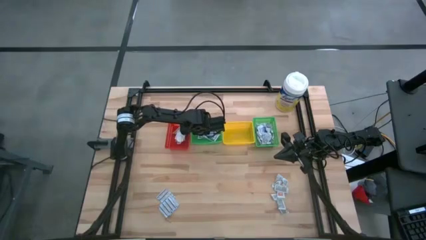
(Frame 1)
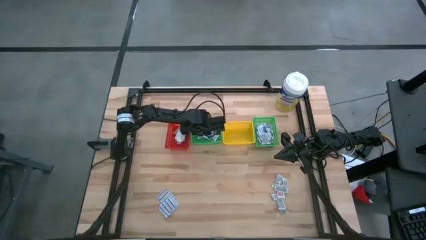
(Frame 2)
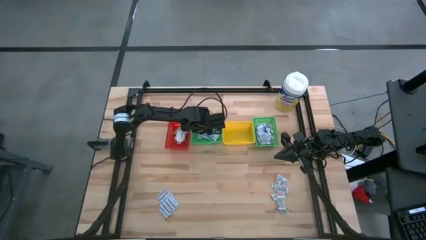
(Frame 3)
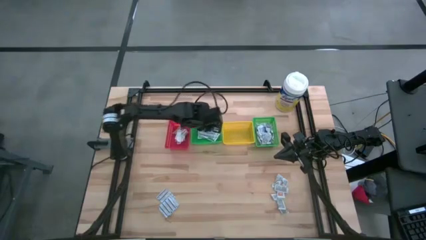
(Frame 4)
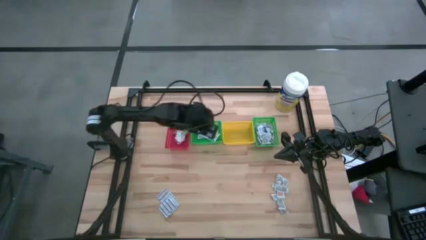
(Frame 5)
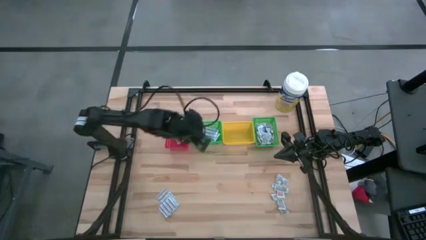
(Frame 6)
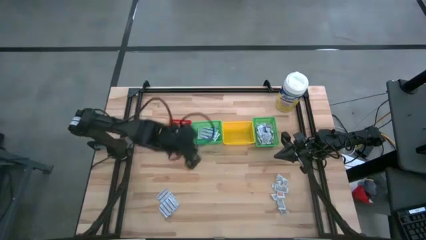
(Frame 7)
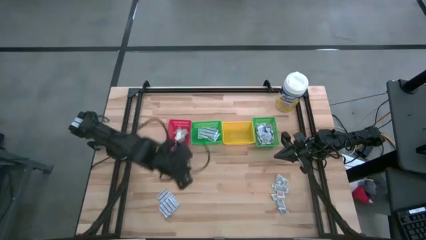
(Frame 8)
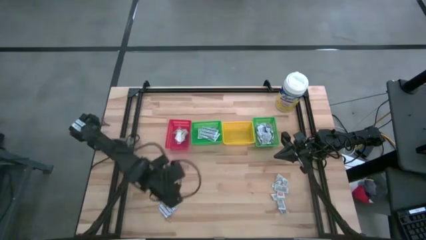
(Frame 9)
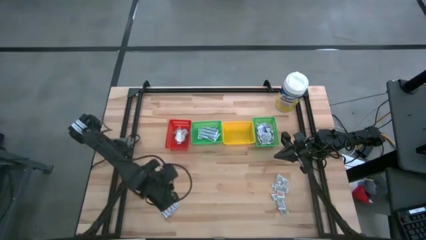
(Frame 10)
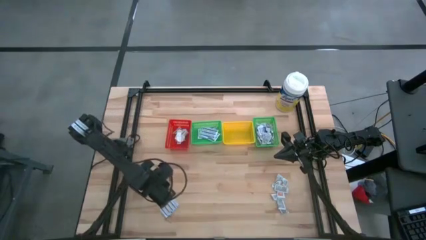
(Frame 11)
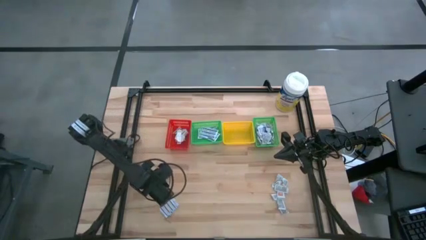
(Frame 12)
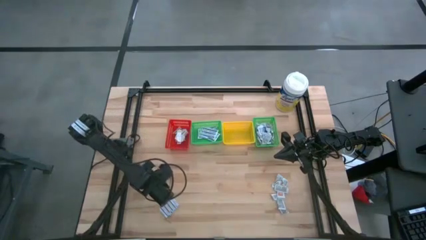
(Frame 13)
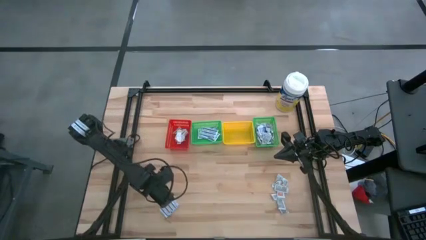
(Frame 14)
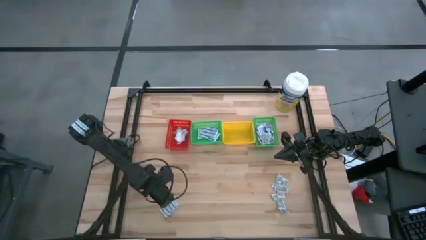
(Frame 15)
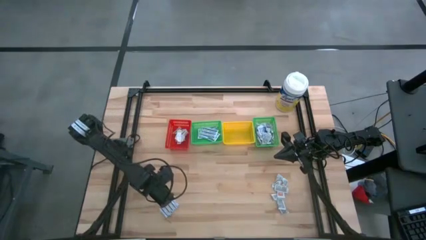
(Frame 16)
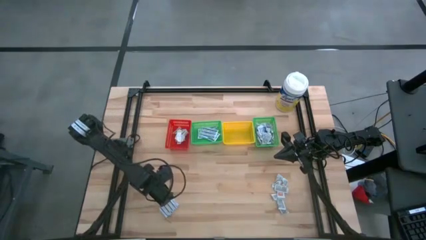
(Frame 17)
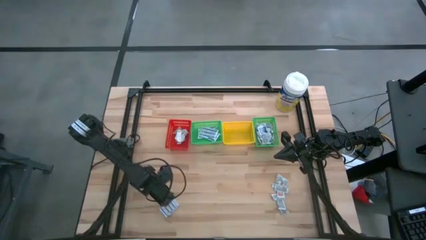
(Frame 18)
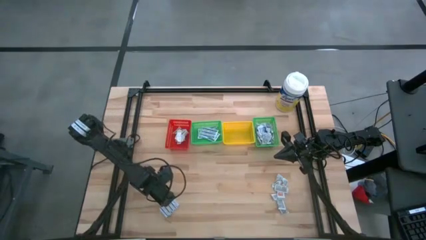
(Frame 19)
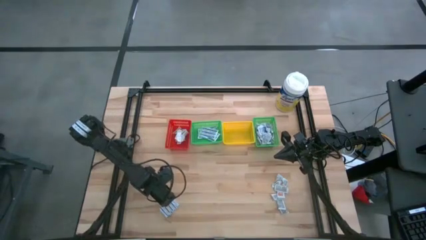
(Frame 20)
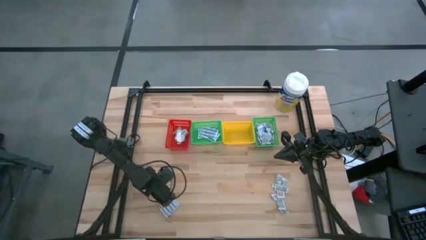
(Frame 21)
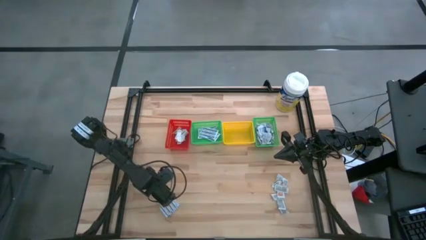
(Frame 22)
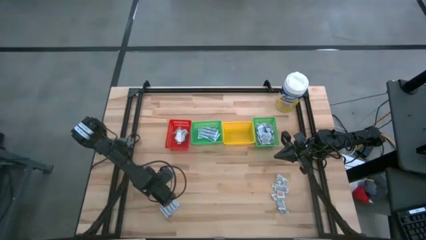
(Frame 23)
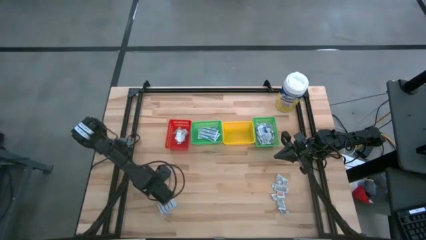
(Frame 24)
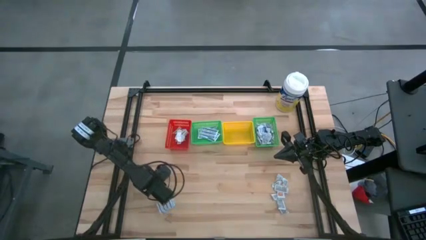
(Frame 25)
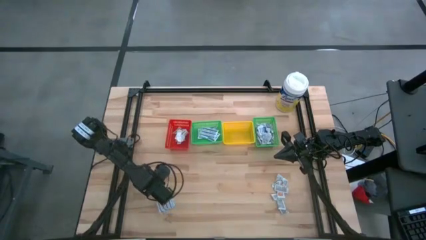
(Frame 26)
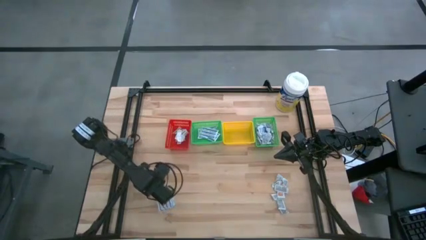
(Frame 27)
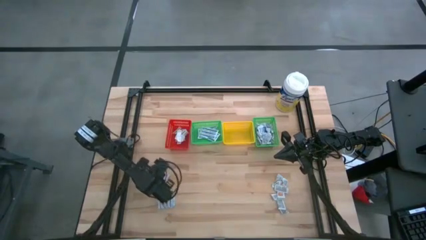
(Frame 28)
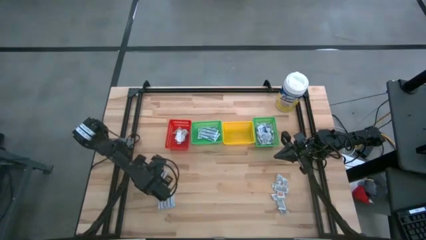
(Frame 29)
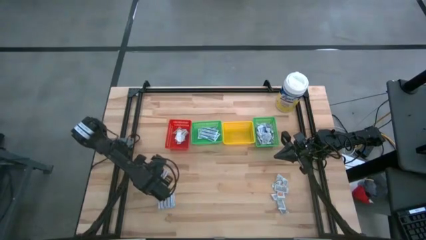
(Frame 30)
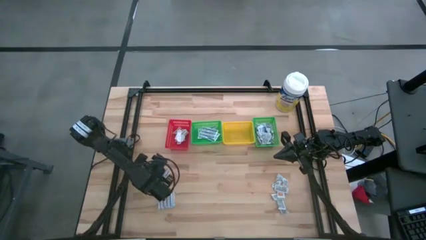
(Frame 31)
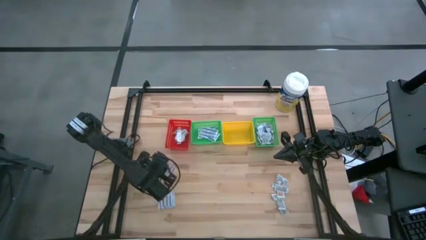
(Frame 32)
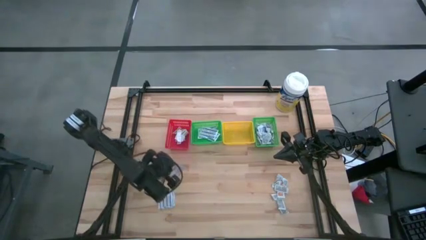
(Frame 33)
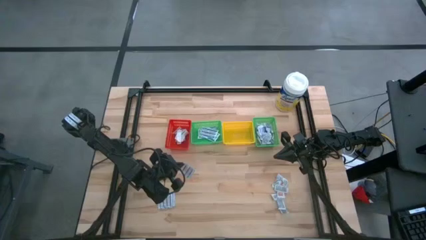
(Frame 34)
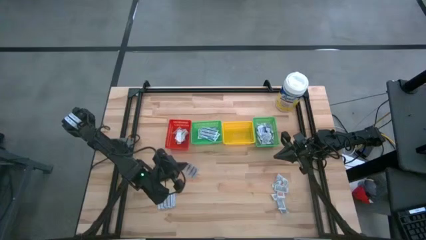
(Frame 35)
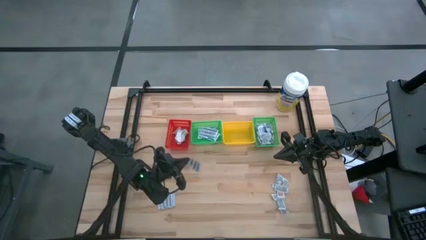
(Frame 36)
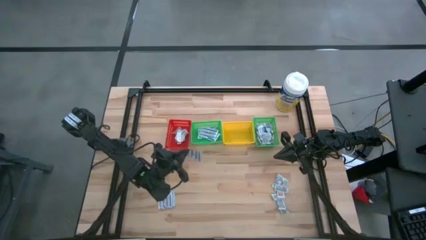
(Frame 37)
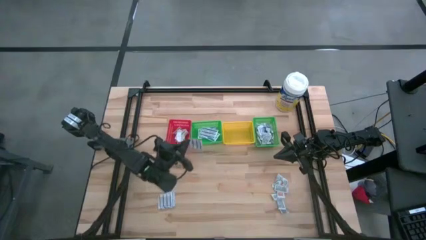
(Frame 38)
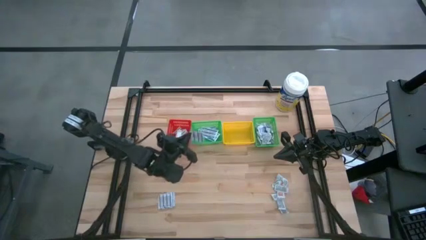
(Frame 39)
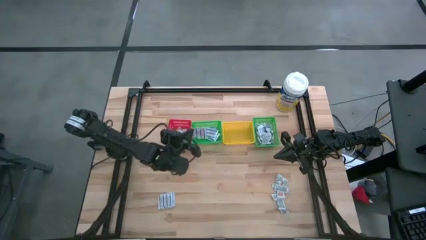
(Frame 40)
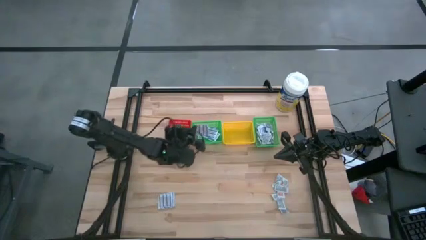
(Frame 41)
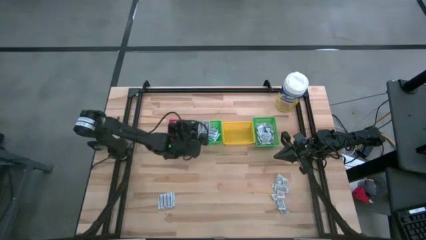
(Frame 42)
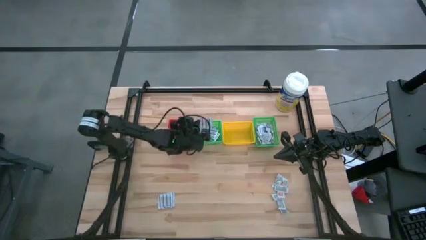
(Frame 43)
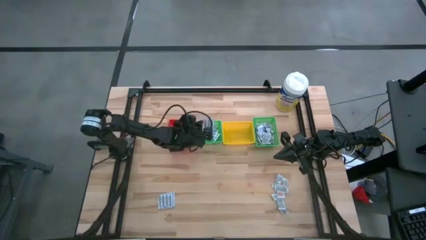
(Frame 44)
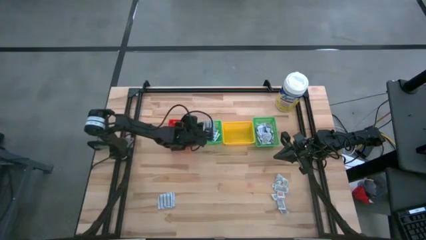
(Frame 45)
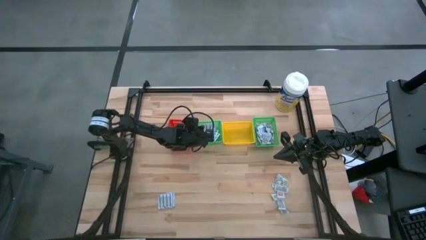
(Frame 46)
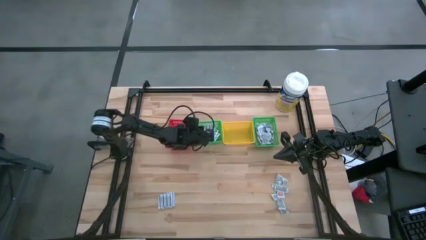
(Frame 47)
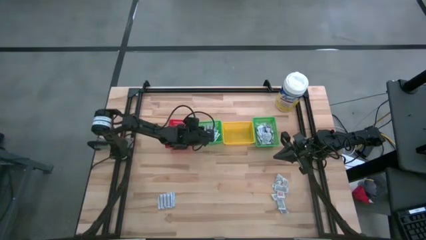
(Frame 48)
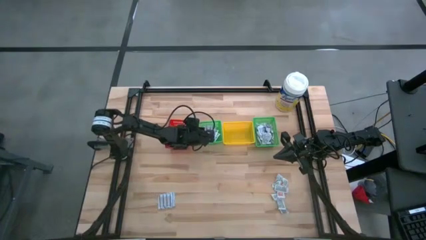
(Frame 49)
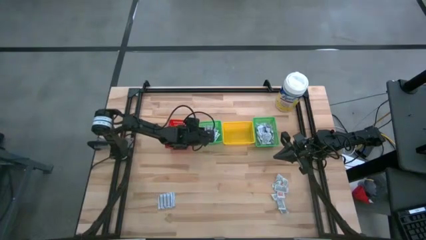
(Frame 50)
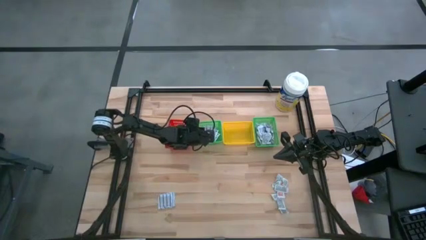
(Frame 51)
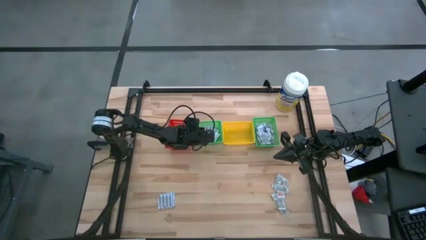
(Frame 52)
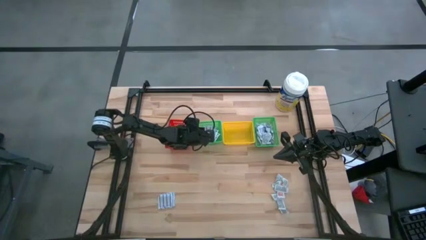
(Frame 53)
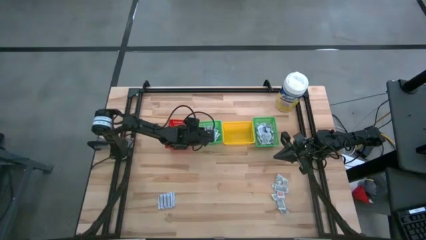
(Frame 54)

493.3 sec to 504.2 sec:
Task: Pick & Place First Aid Supplies
Put the blue bandage into the left green bin

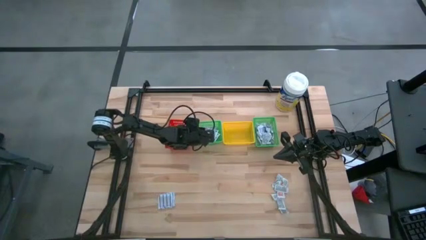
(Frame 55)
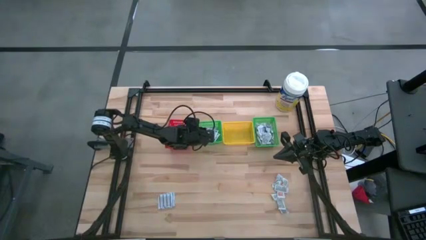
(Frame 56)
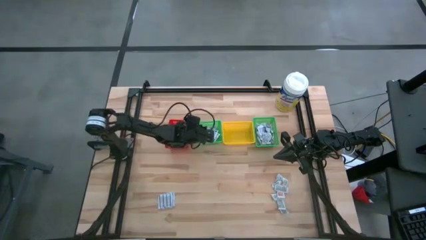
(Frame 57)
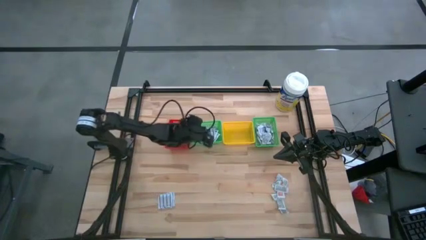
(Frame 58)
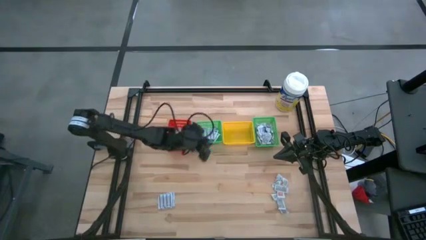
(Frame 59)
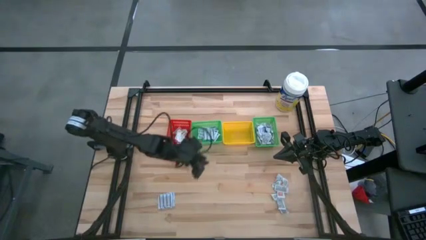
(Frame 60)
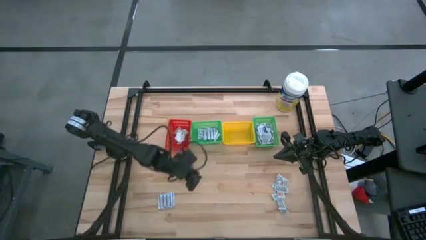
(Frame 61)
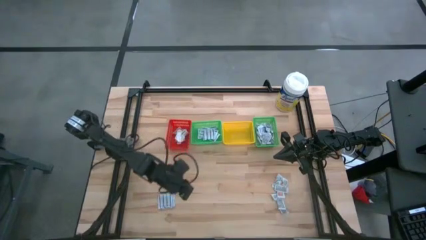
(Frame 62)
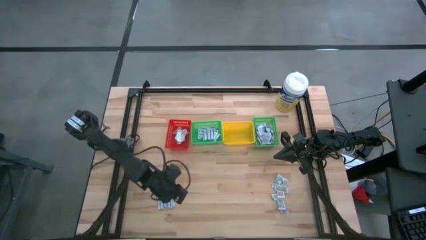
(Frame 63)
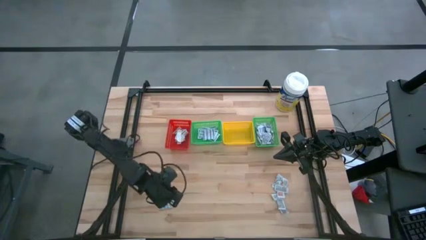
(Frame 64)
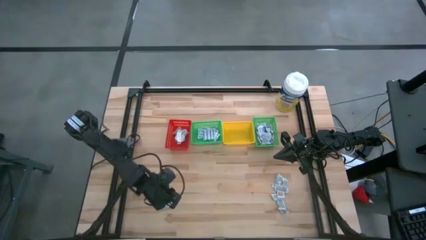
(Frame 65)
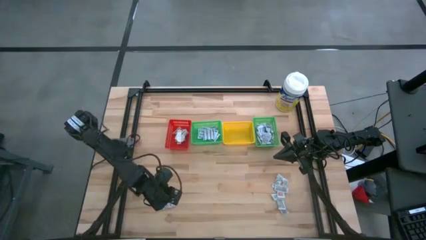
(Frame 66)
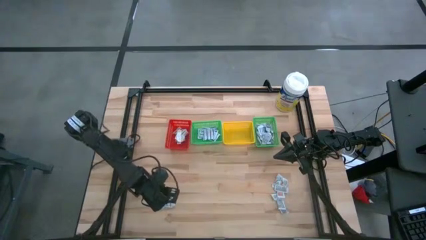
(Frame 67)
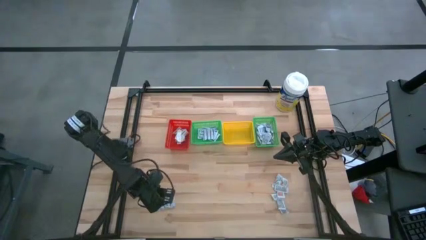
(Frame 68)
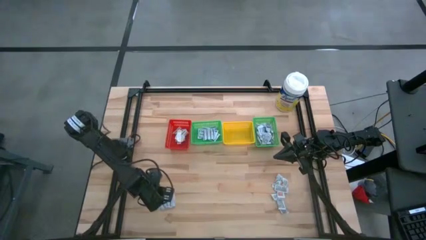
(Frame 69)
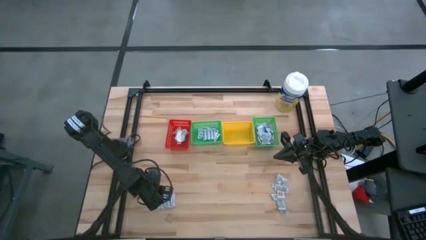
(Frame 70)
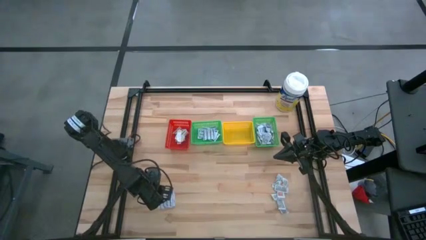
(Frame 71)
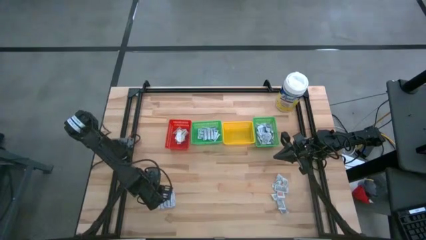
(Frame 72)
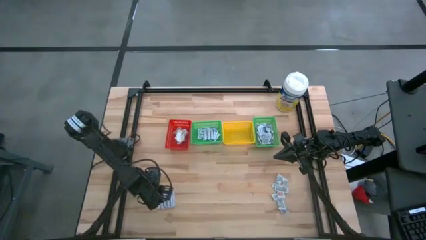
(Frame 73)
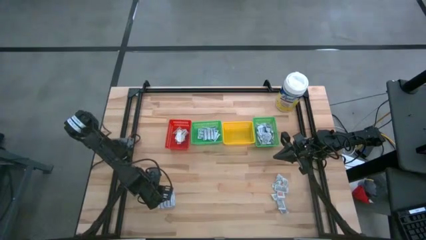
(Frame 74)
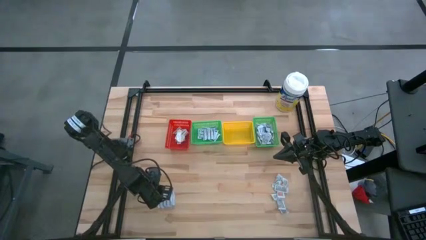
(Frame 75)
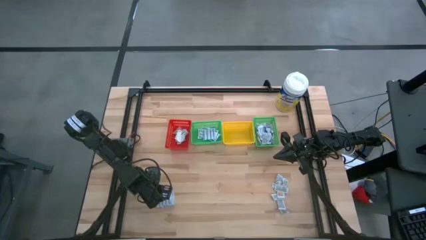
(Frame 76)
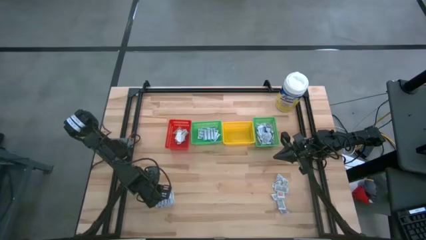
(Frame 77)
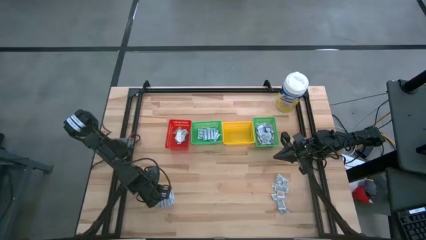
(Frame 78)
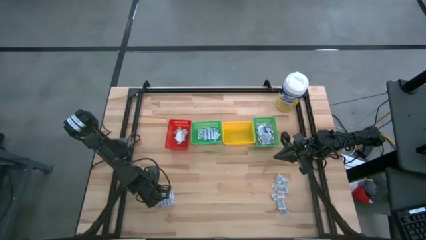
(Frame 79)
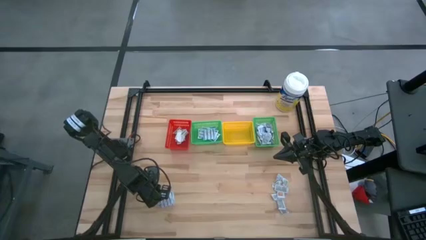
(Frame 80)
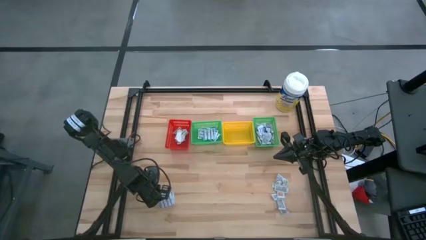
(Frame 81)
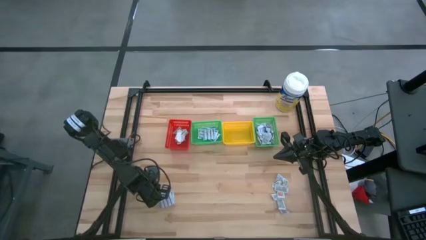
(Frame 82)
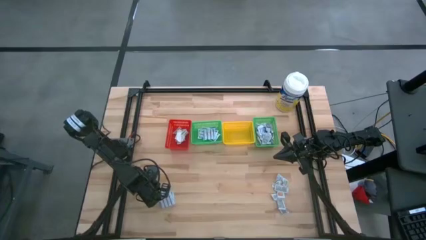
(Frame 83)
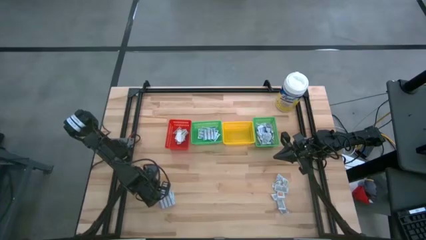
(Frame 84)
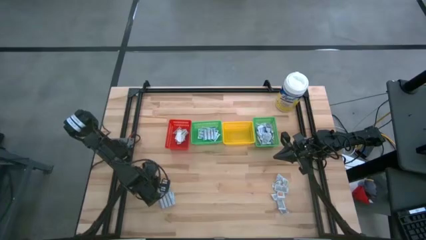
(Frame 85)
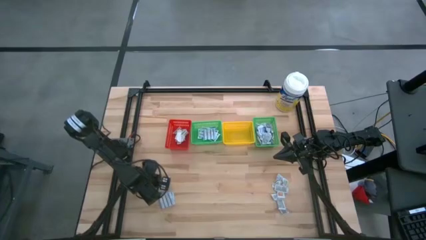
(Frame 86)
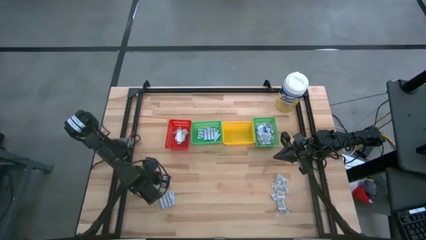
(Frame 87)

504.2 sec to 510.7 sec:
Put the blue bandage into the left green bin
